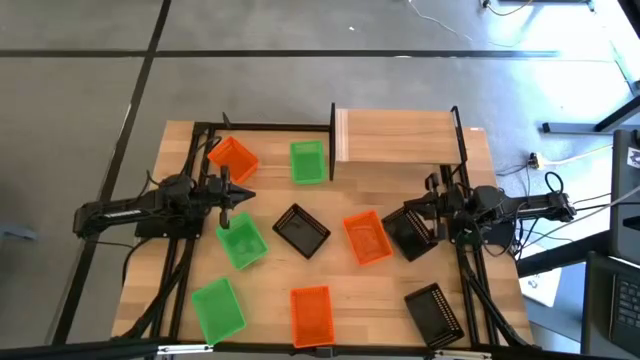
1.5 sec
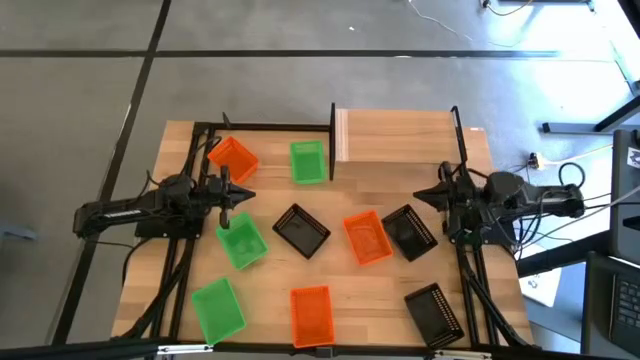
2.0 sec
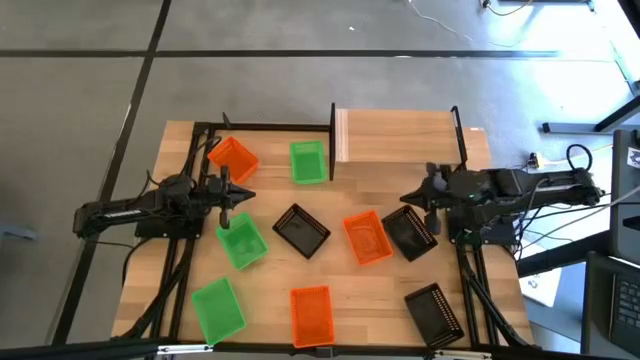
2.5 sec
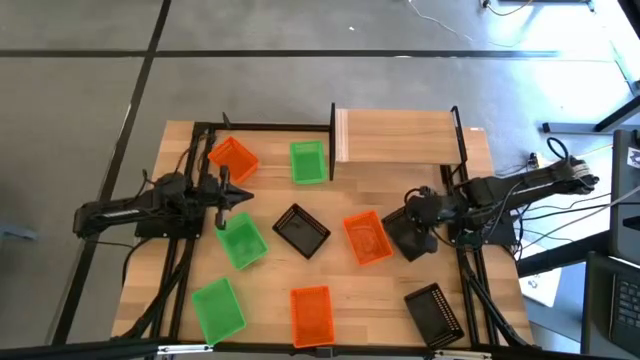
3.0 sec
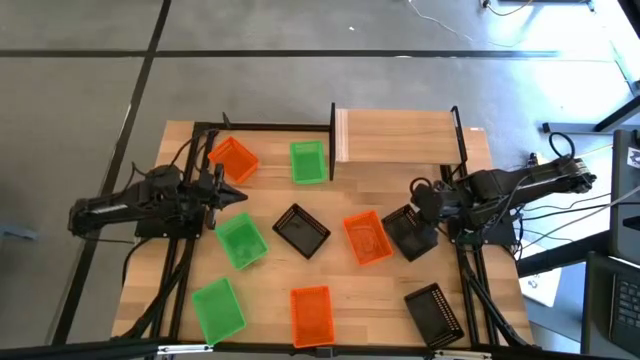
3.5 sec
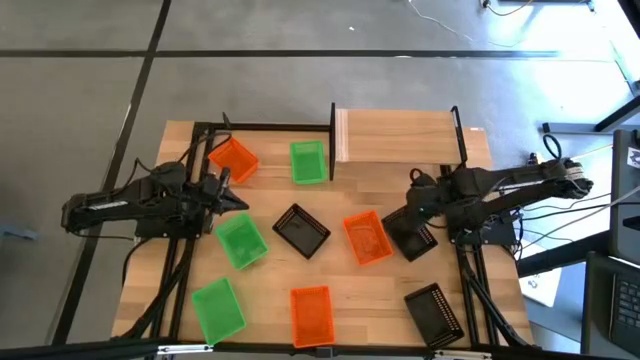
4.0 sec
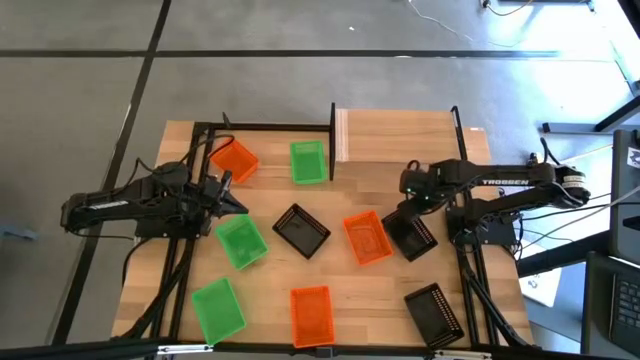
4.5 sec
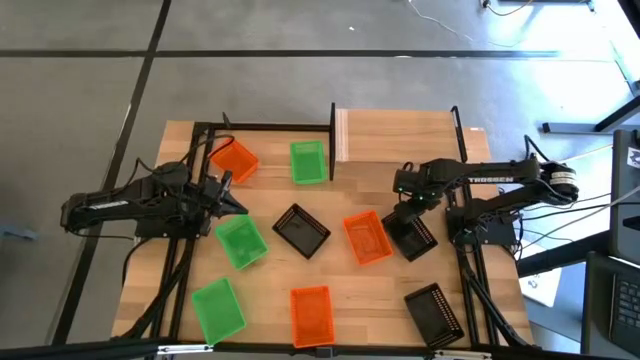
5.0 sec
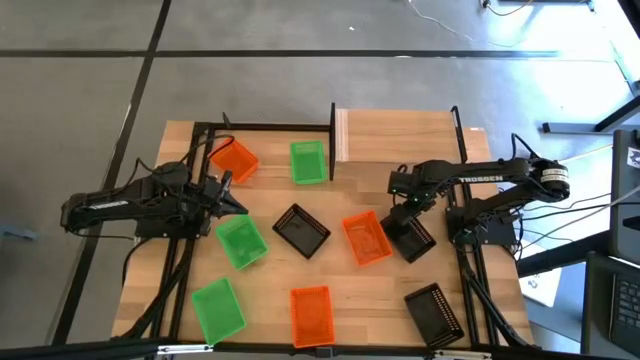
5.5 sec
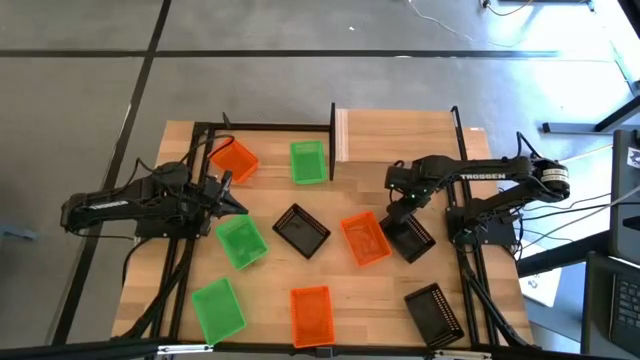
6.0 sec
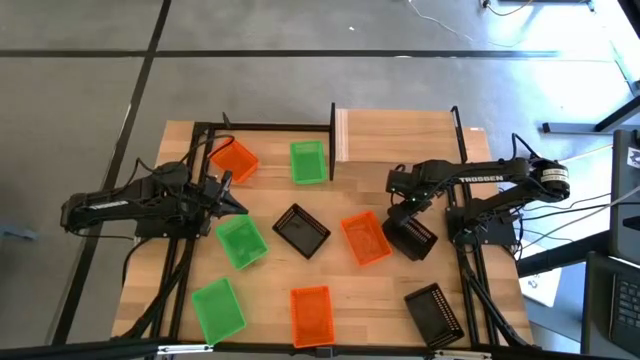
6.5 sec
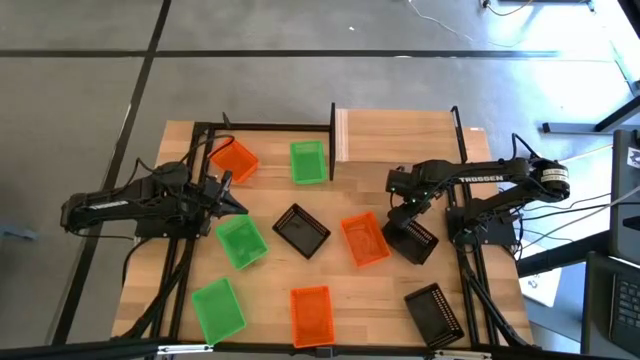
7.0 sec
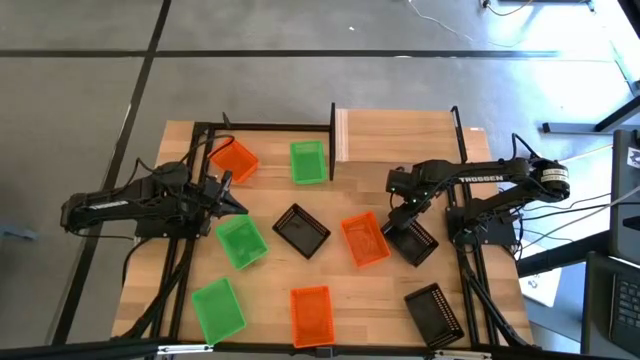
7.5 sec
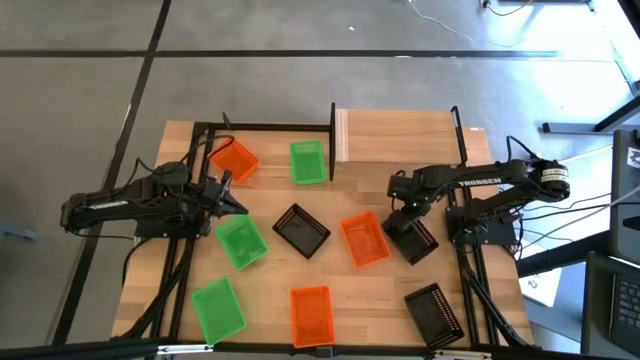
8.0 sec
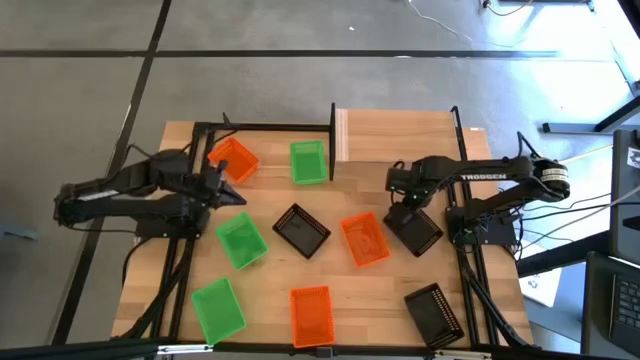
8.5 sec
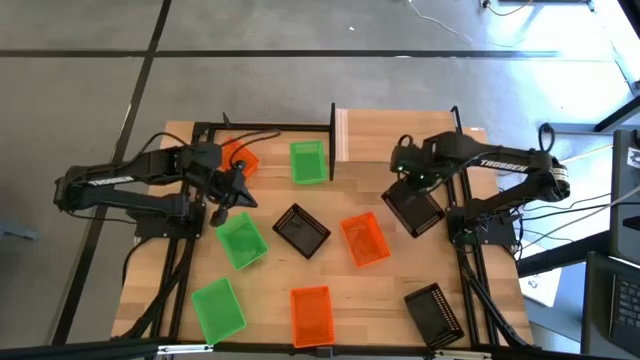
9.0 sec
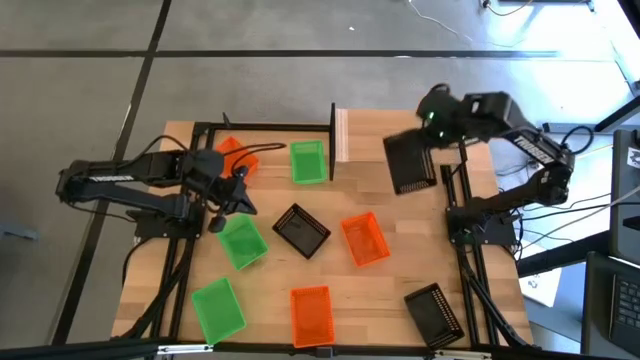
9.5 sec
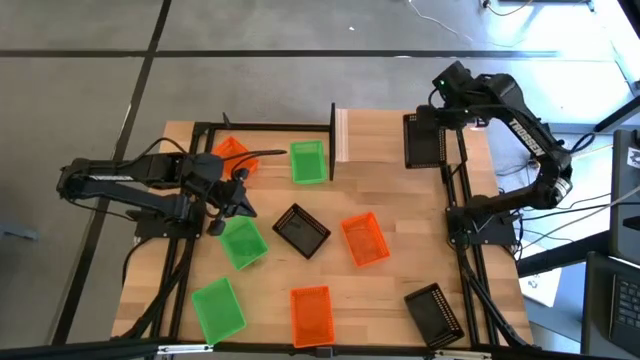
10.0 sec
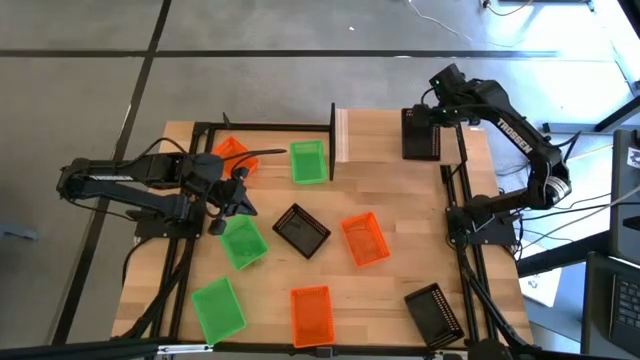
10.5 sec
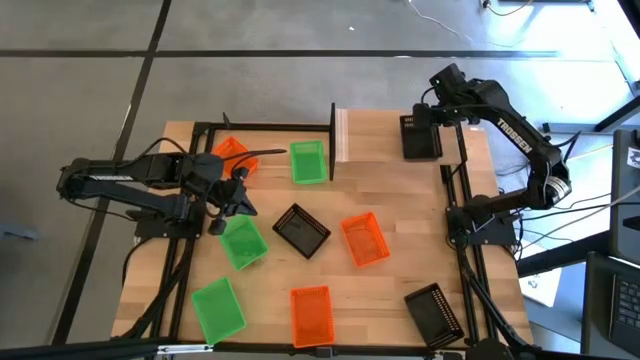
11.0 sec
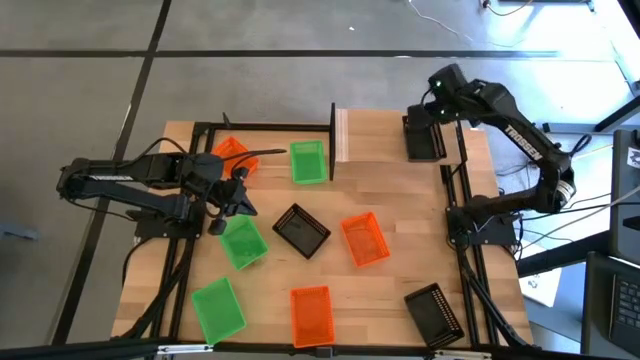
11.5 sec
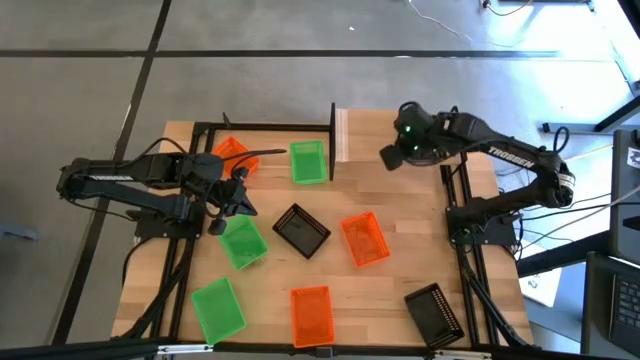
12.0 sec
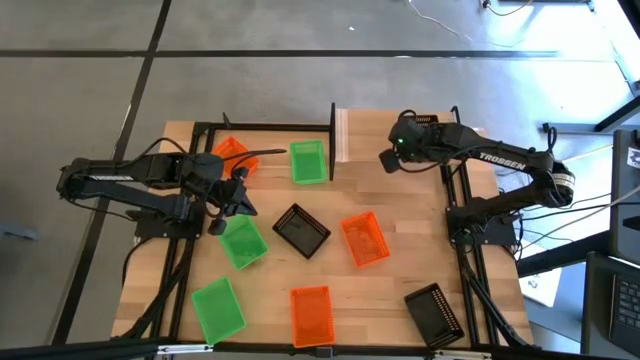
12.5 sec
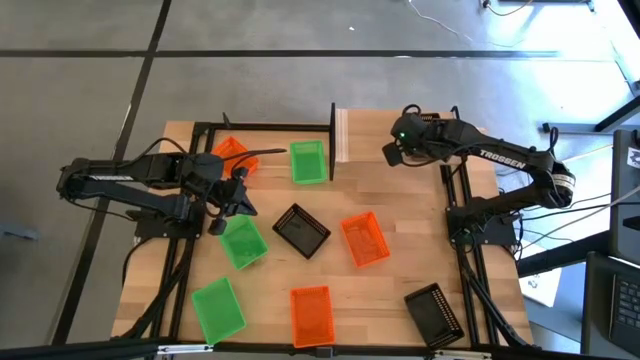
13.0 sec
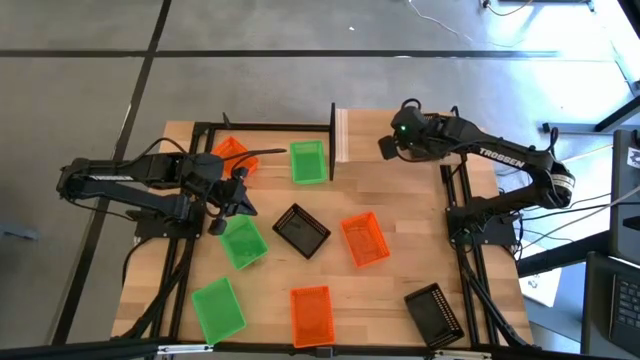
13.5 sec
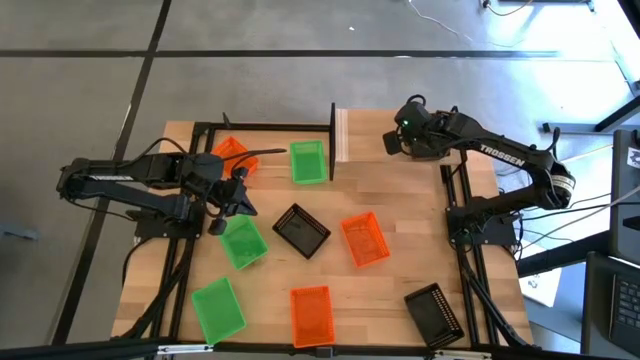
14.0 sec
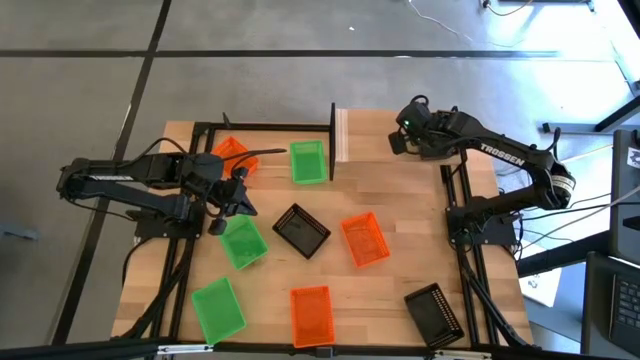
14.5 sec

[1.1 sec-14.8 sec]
Task: Stack baskets on shelf by color
Put the top right black bin on the shelf

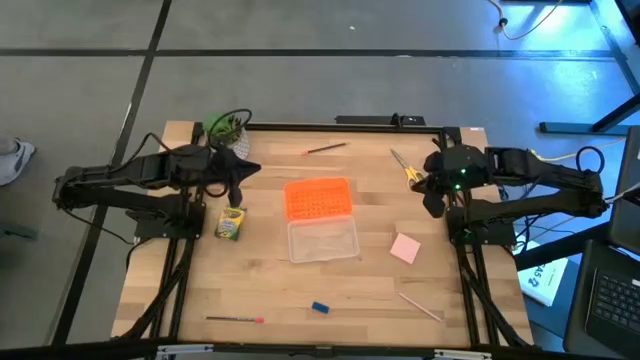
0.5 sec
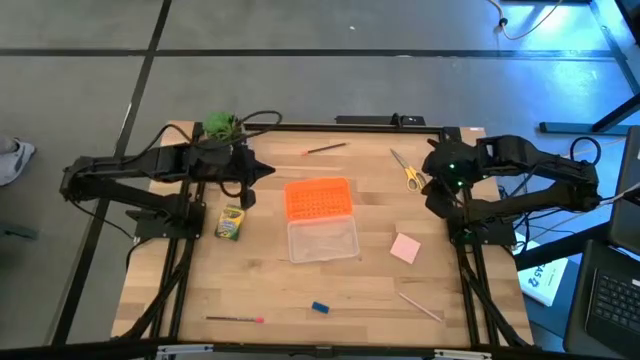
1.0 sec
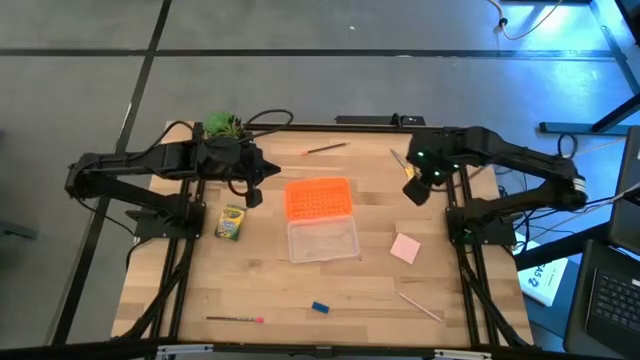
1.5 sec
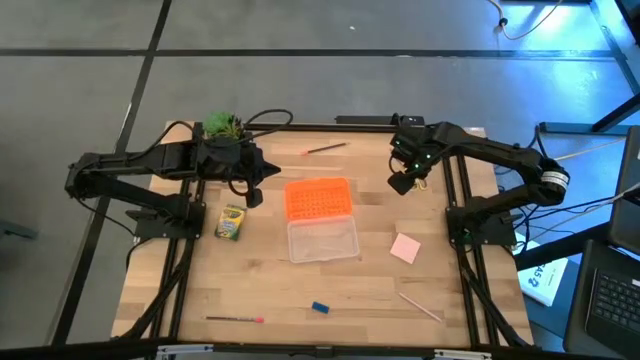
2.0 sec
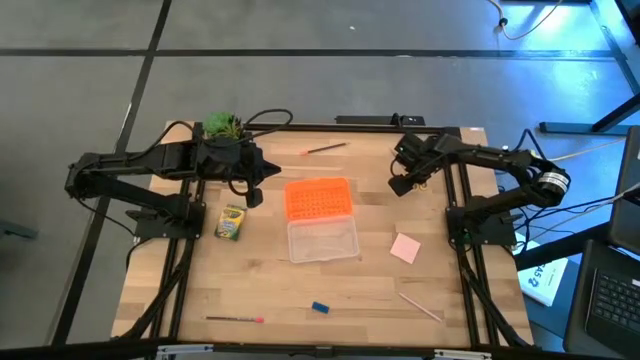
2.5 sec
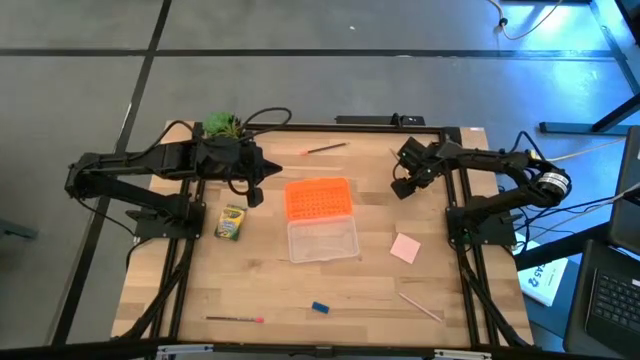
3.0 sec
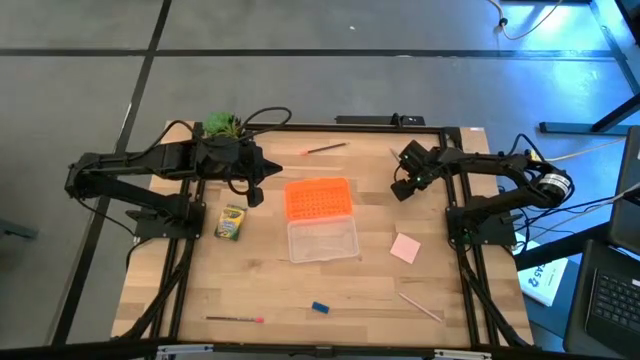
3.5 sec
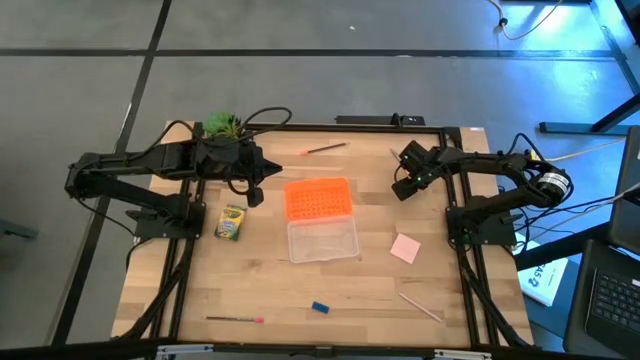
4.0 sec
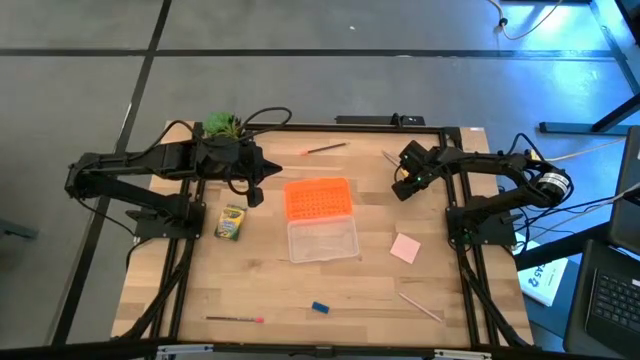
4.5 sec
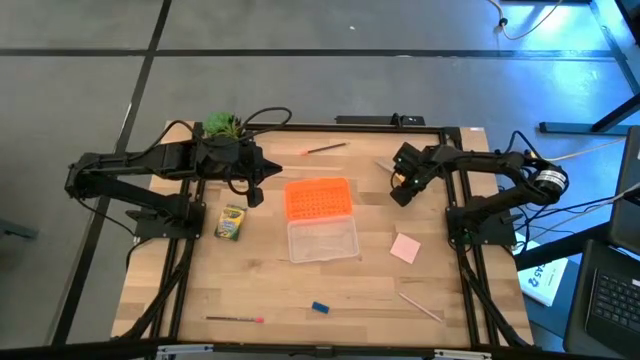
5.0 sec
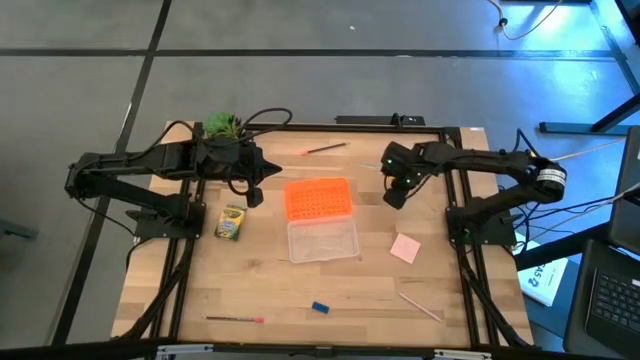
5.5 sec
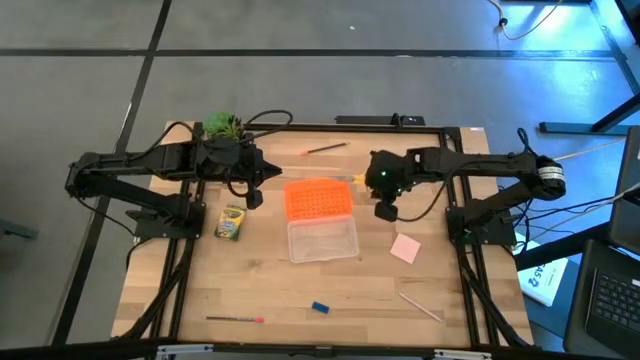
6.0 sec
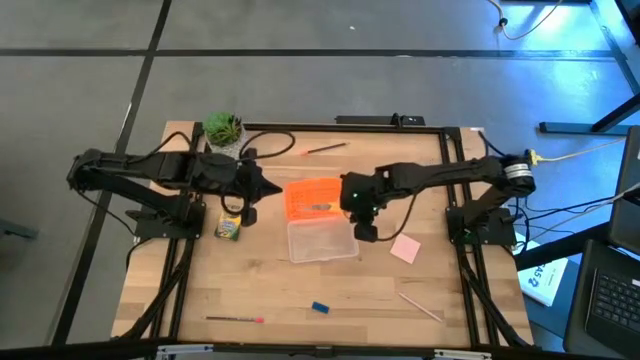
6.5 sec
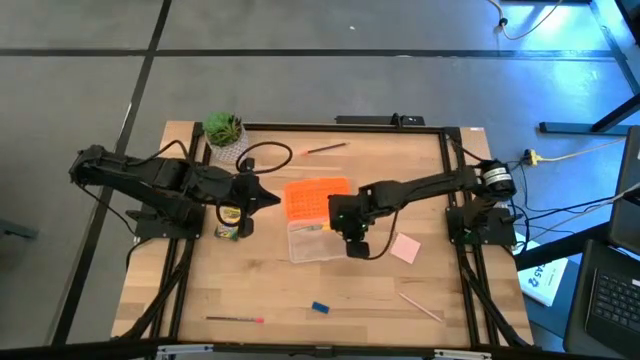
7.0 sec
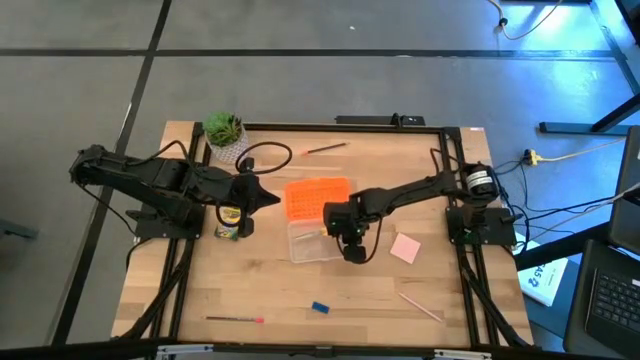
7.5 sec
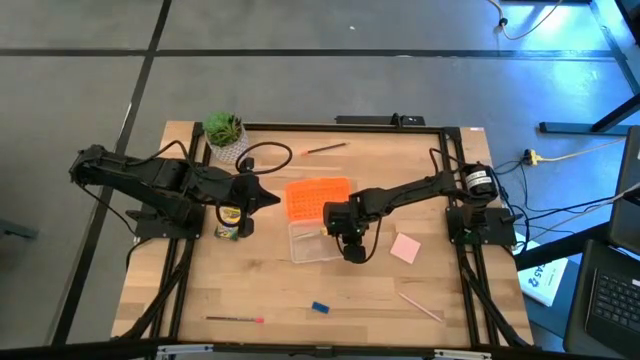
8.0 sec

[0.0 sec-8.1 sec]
Task: Pack school essentials
Put the yellow scissors into the supply box
